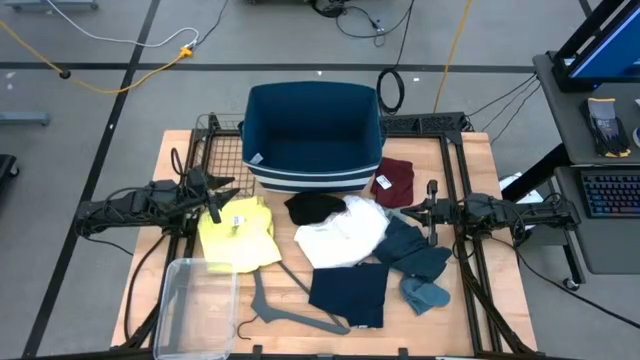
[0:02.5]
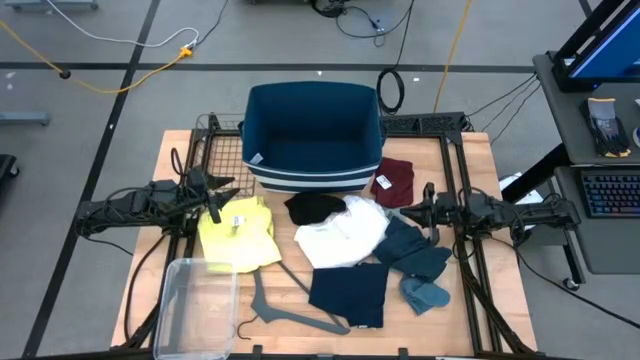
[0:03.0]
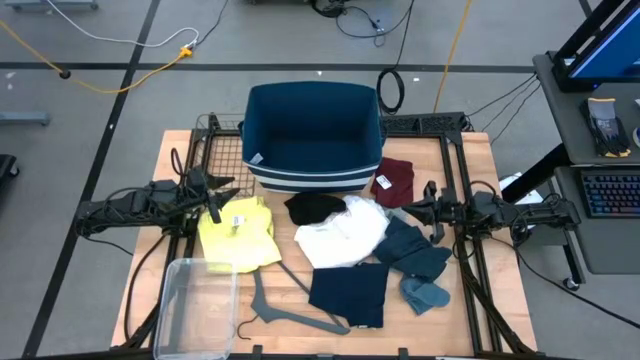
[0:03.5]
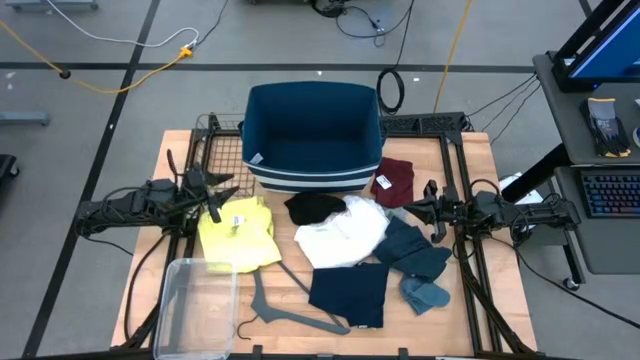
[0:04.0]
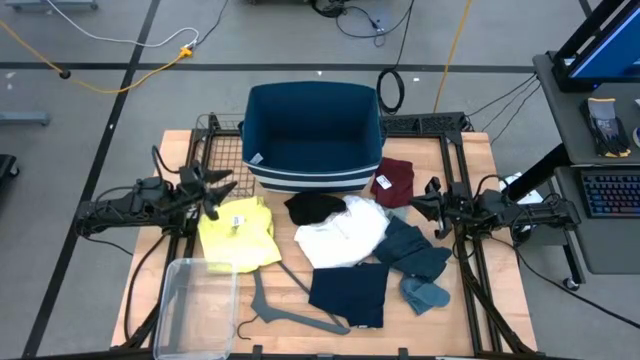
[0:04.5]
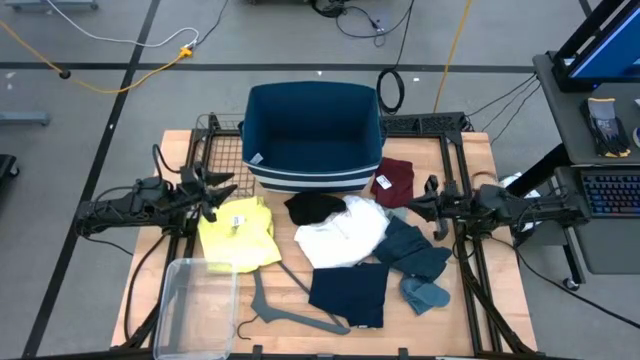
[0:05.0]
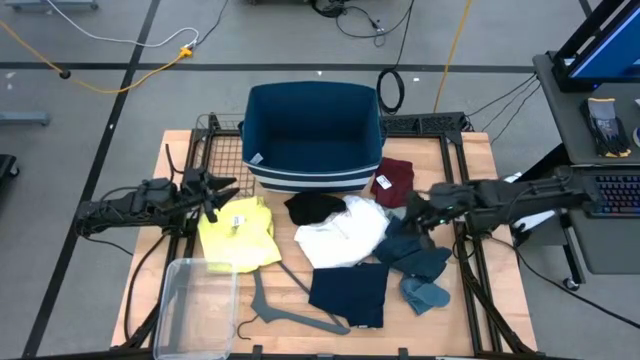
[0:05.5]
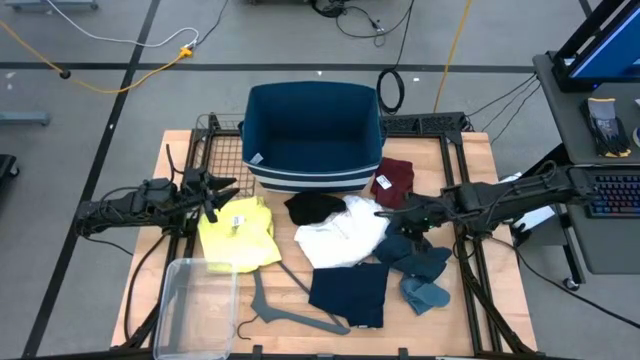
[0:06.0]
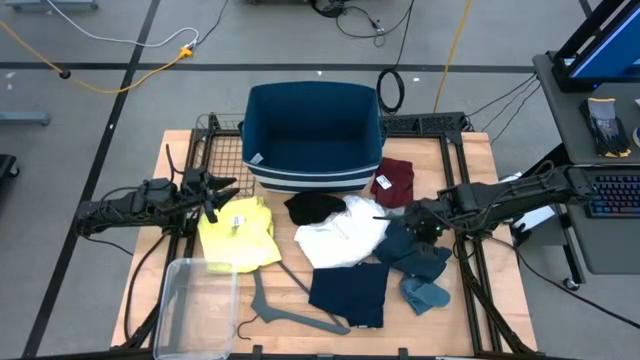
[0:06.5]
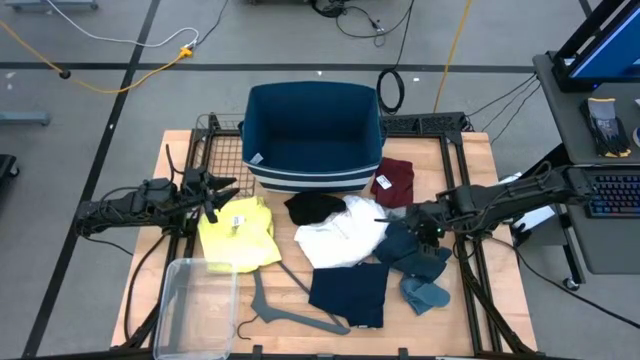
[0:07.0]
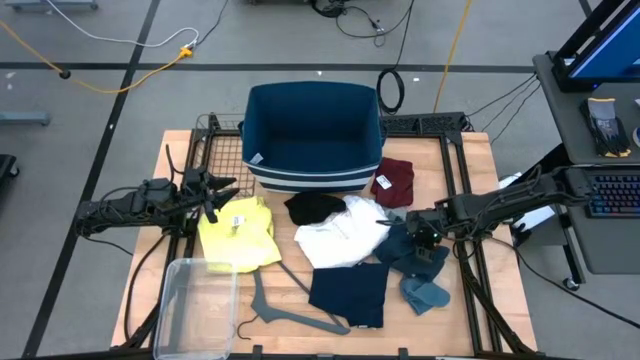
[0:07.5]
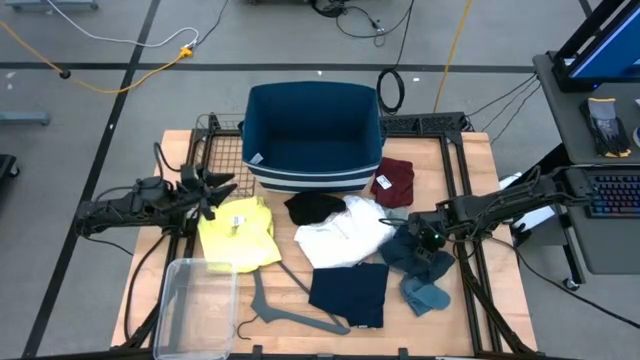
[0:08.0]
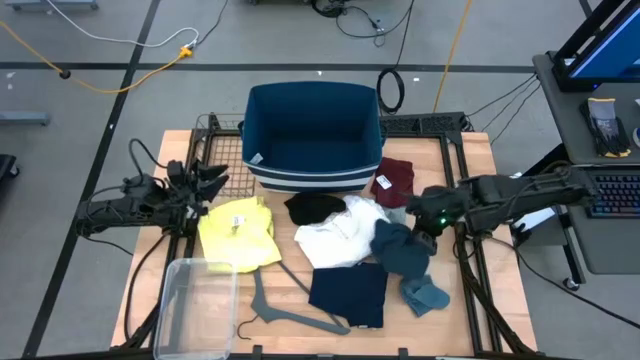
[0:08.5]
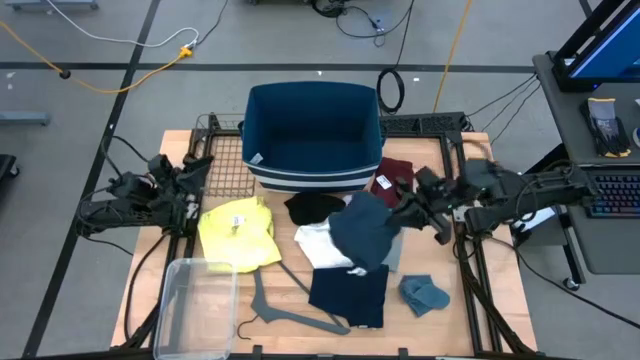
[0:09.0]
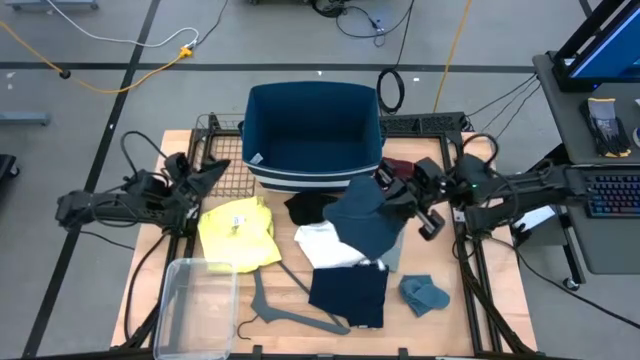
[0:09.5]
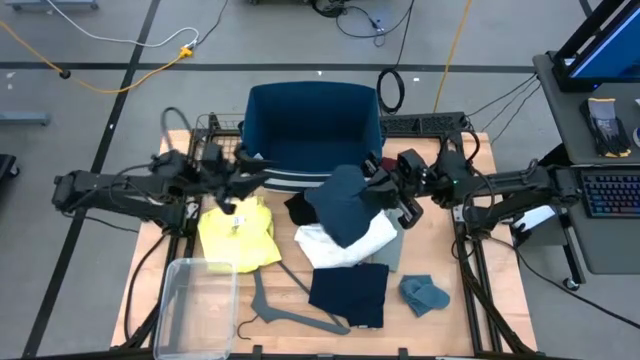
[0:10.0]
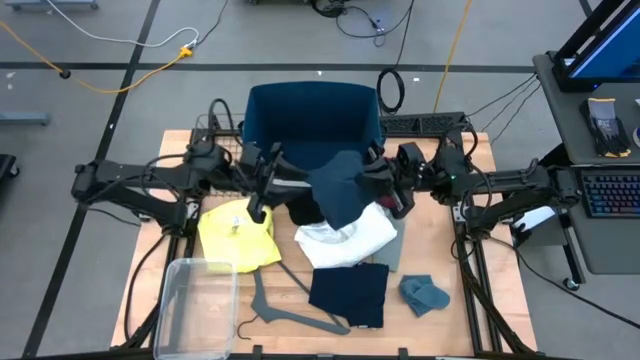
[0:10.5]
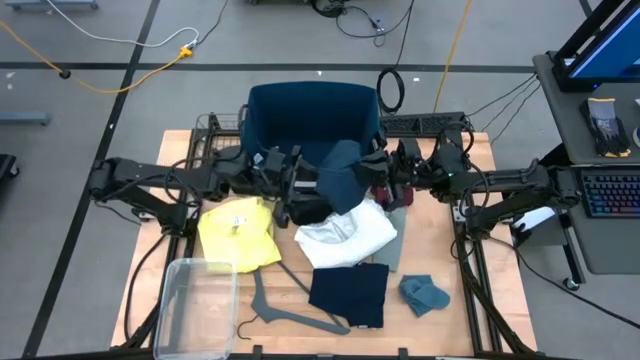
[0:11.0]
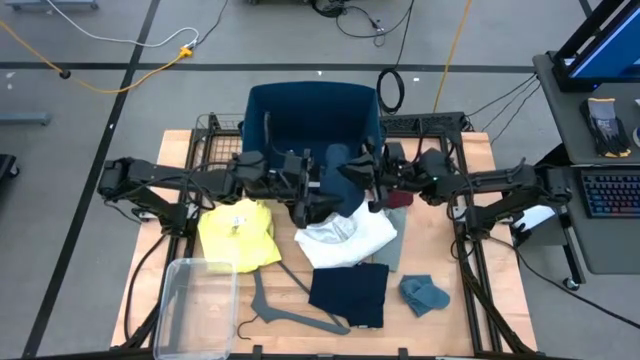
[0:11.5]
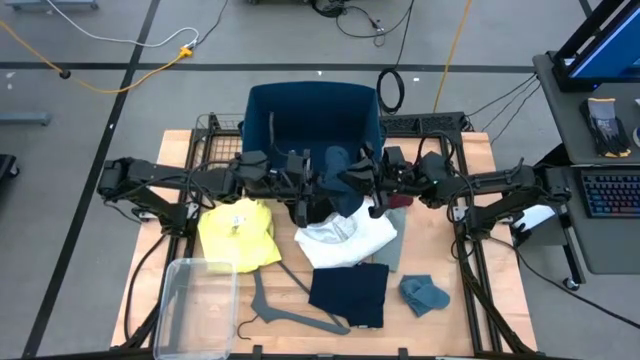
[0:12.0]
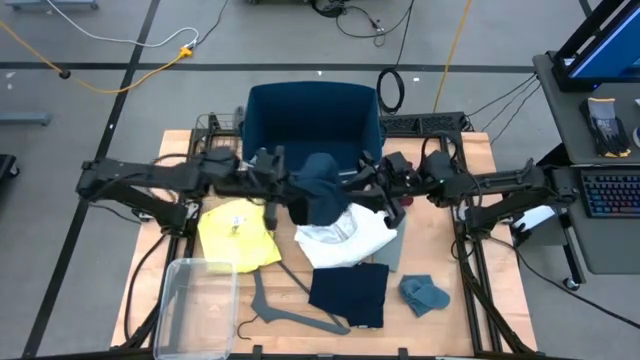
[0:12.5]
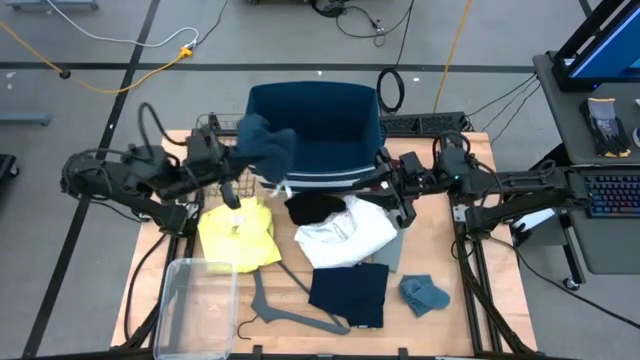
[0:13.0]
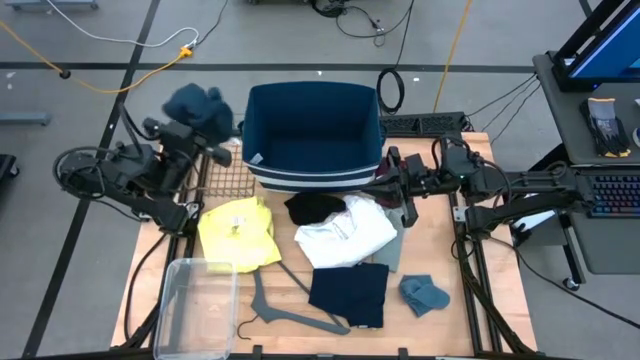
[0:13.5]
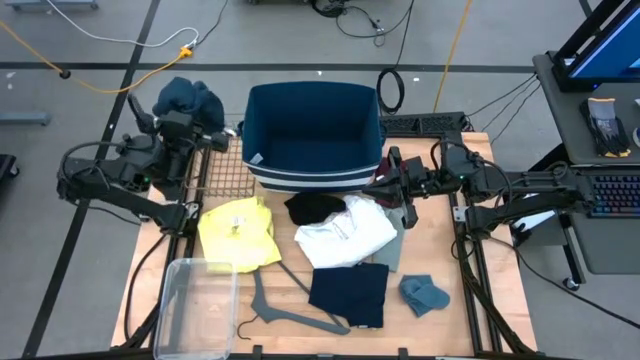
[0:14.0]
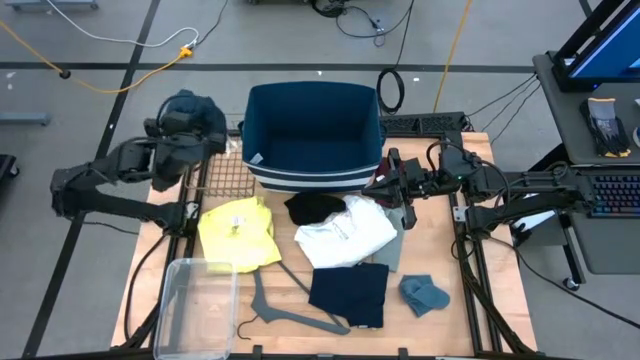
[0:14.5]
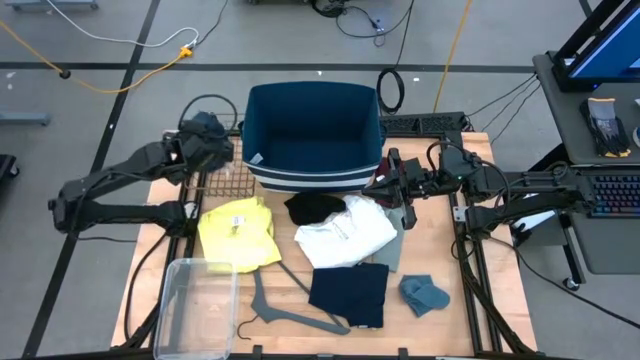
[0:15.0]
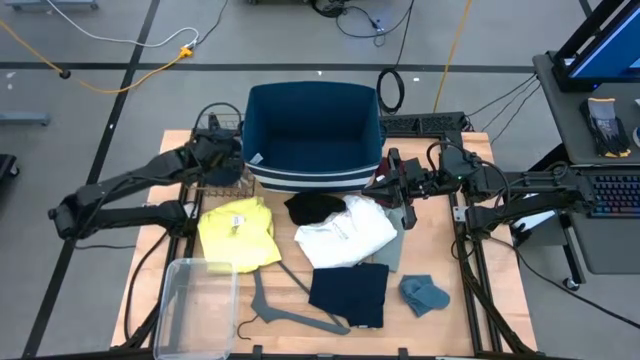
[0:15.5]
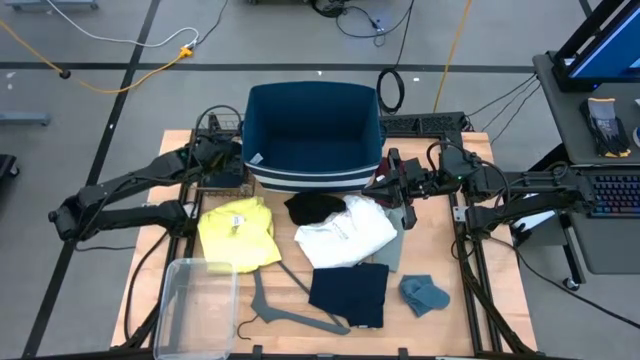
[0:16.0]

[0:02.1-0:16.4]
Task: Pick & Place Cloths
Put the gray shorts into the brown wire basket

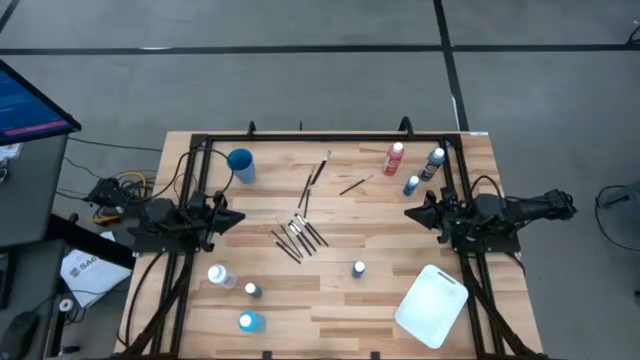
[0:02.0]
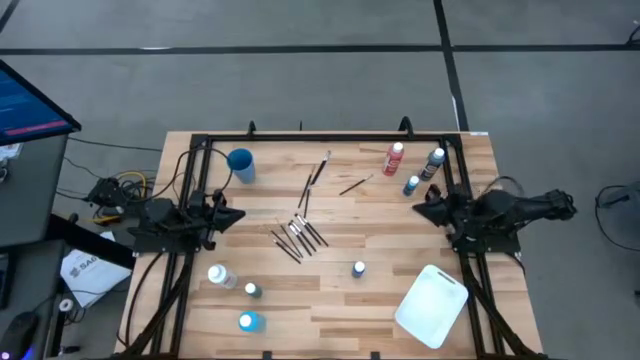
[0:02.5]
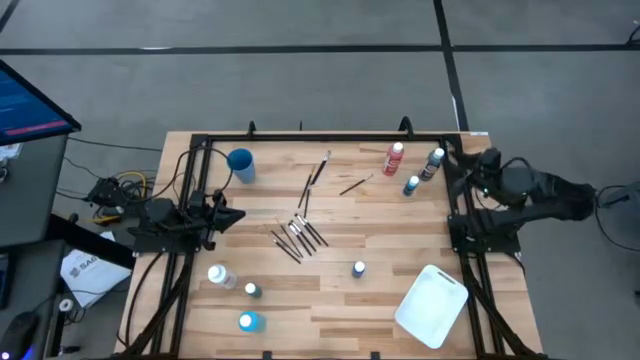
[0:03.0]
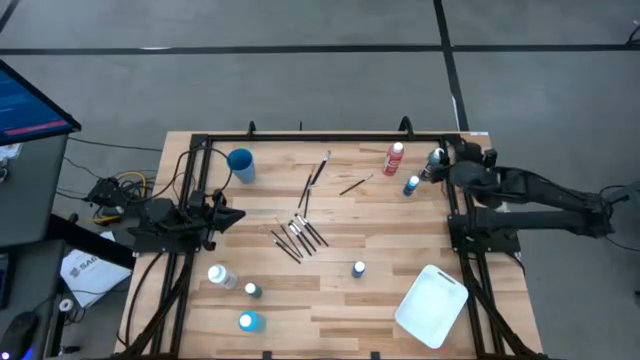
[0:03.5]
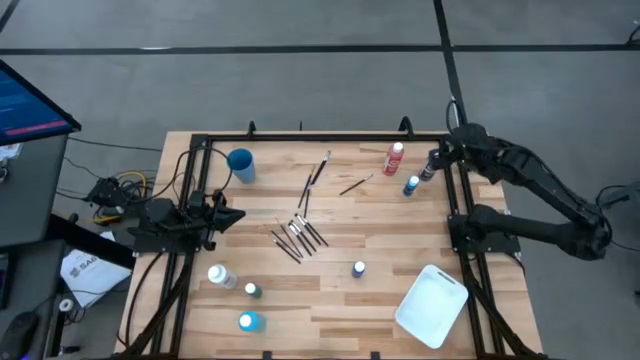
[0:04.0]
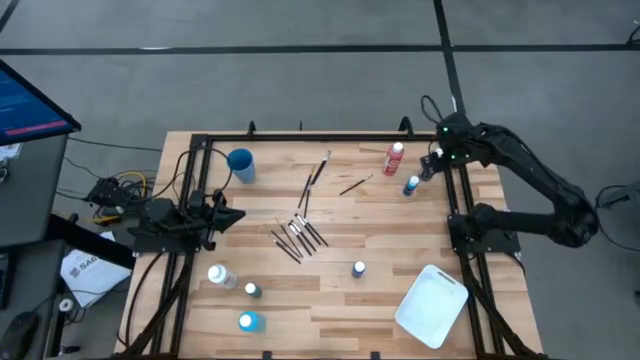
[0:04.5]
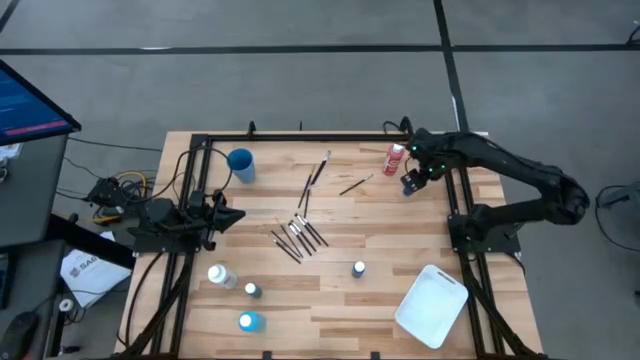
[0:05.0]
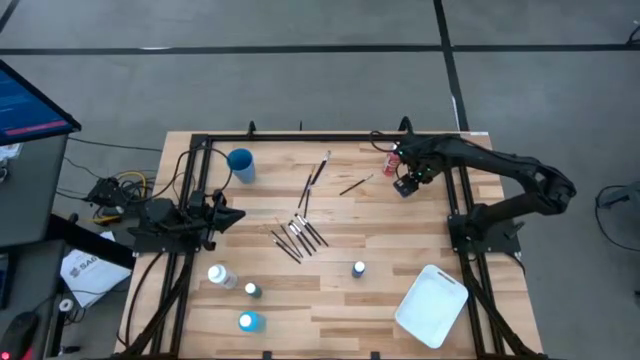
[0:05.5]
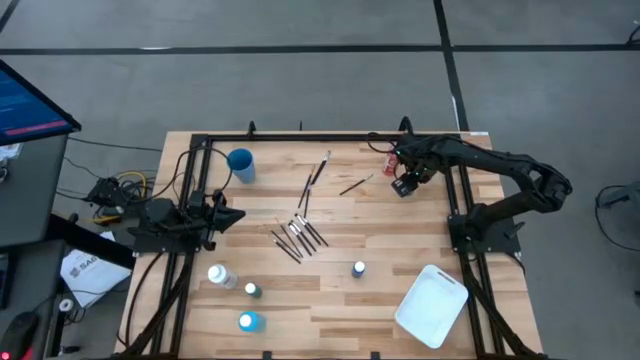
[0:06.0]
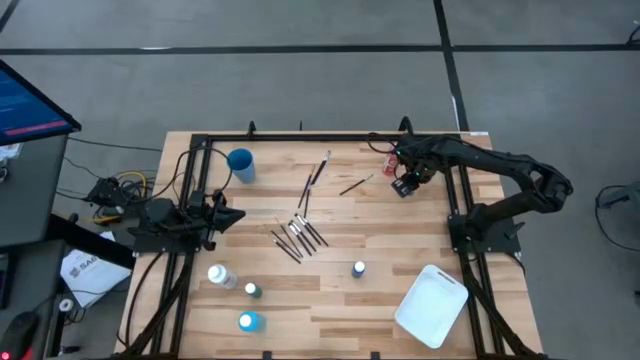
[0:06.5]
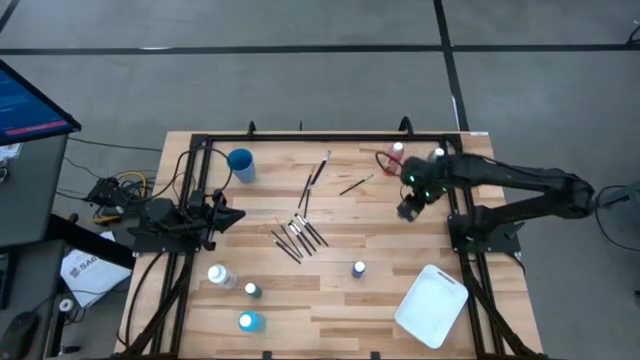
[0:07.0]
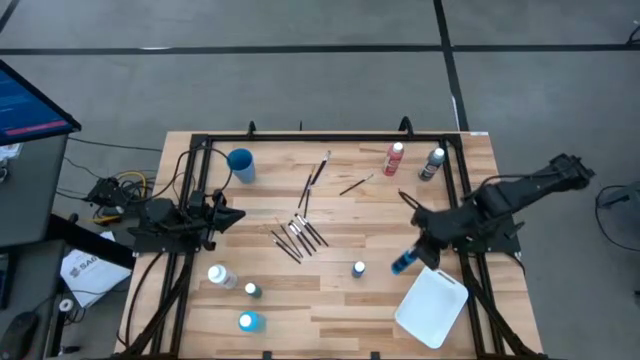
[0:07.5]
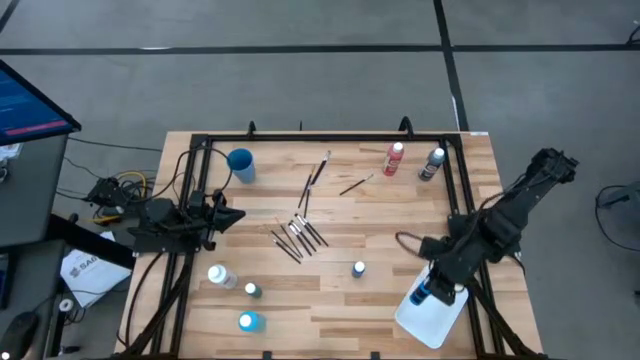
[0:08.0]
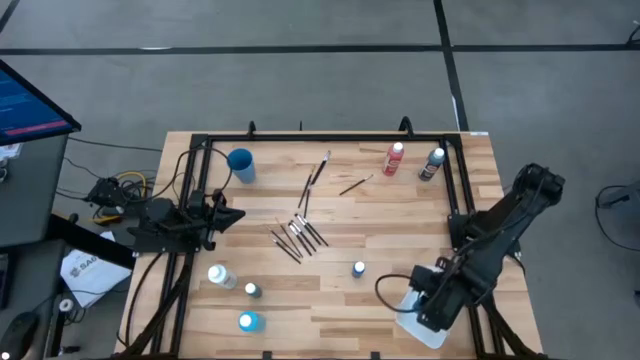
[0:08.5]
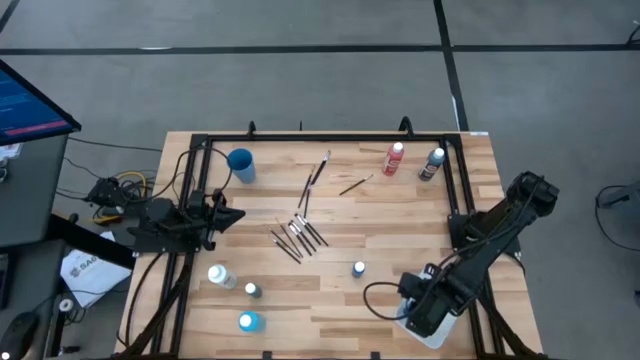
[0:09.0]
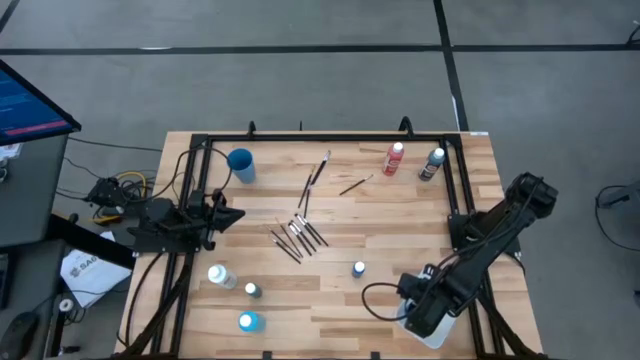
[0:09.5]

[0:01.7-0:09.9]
Task: Pick & Place Paint Supplies
Put the top small blue paint bottle into the white bin
